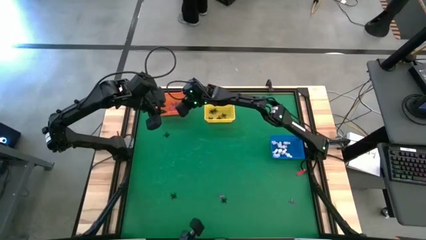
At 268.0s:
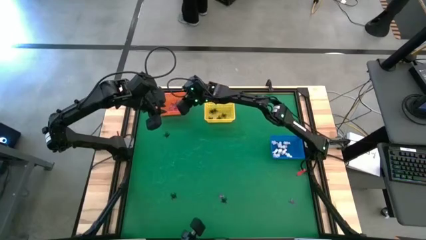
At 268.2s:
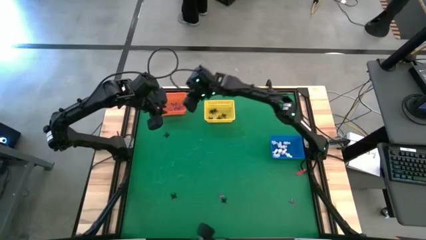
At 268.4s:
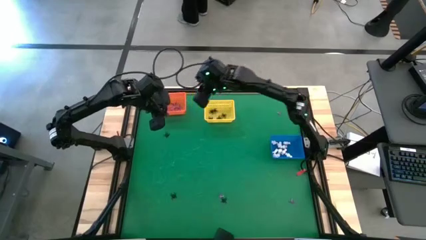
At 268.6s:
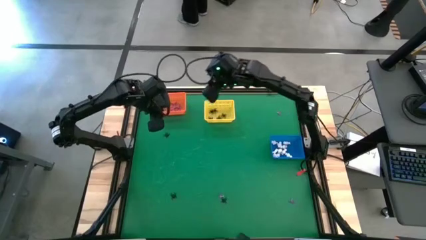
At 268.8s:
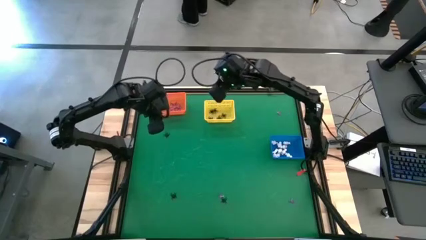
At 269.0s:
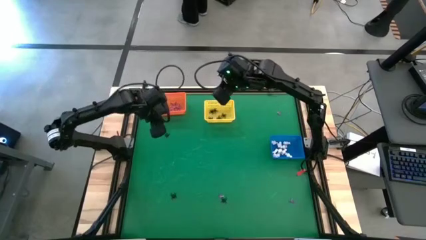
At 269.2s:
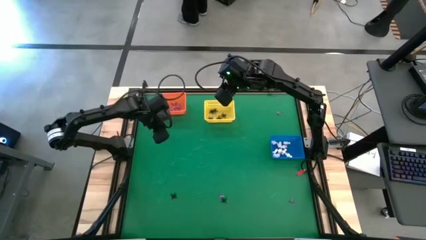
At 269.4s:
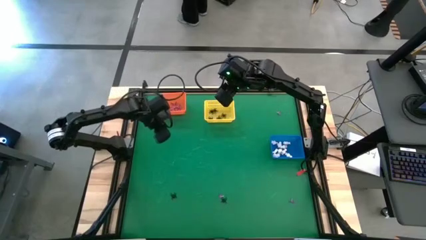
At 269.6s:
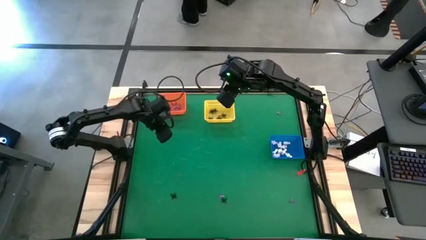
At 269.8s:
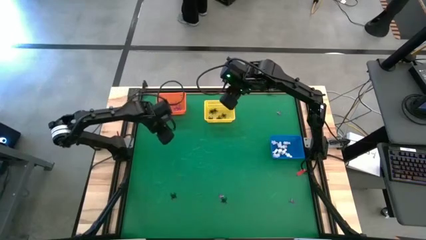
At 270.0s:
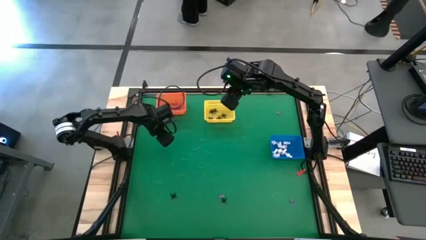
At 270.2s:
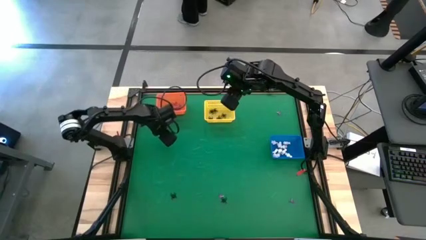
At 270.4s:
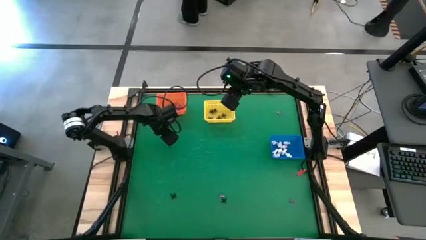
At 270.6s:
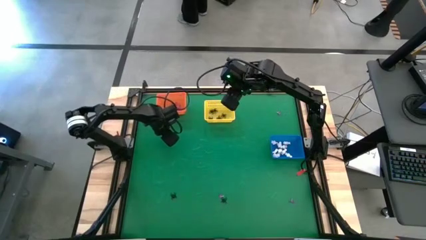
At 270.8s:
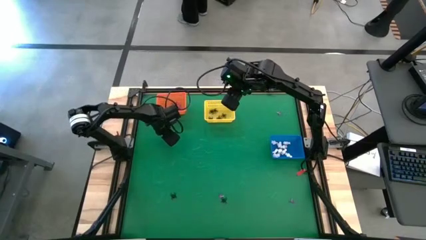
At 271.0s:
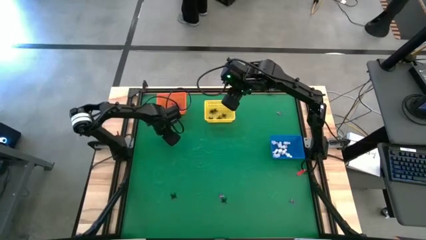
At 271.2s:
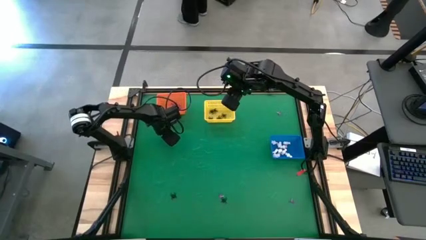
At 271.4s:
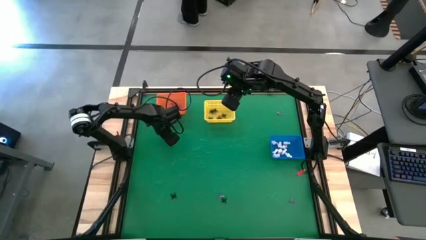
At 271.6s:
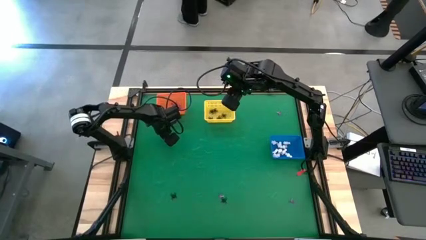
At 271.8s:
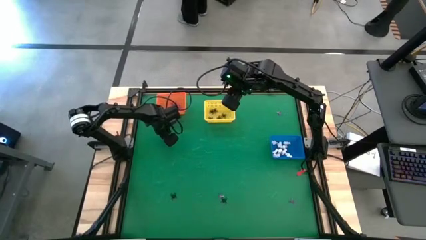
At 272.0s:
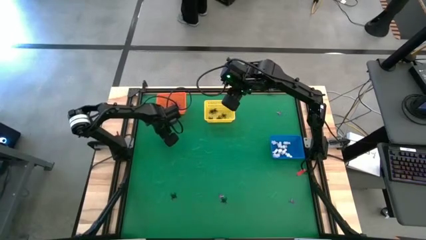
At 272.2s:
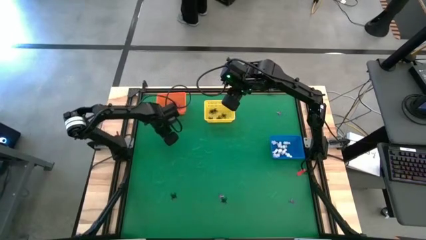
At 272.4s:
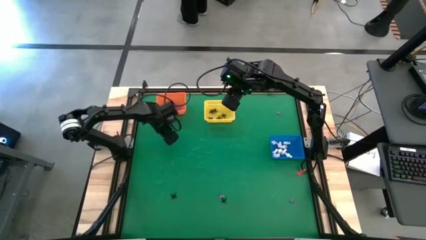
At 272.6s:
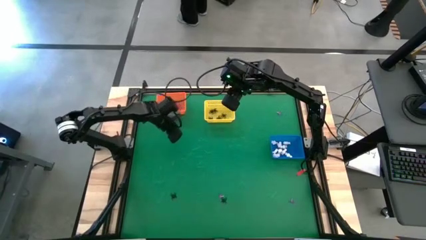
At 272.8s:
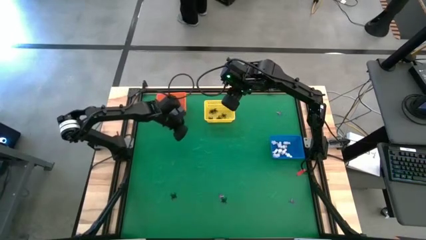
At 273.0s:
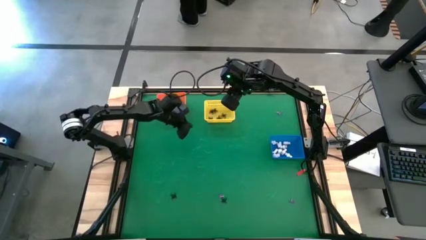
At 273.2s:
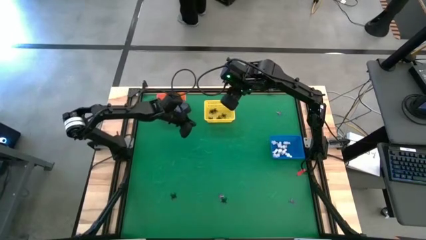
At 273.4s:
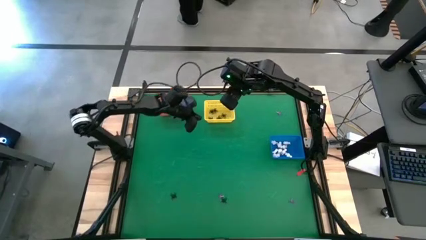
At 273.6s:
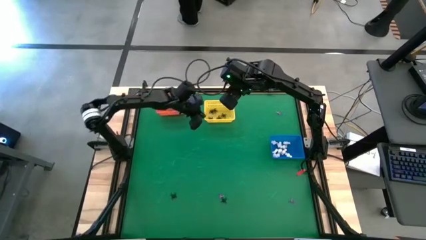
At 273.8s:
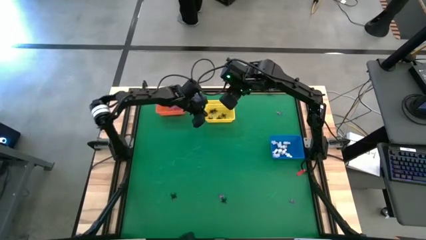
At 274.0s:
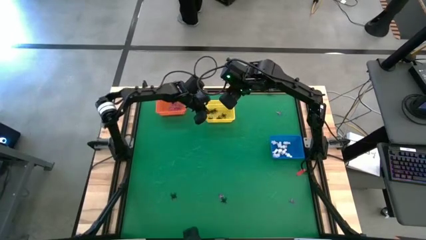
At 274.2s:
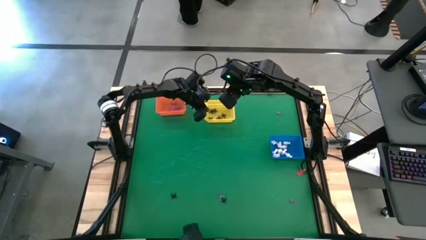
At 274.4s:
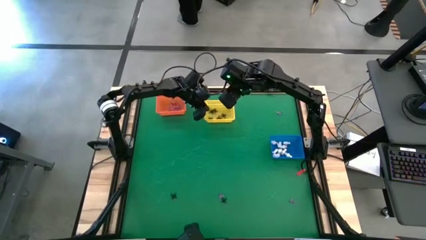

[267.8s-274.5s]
Task: Sort Halloween decoration
Put the black spider toy into the yellow basket

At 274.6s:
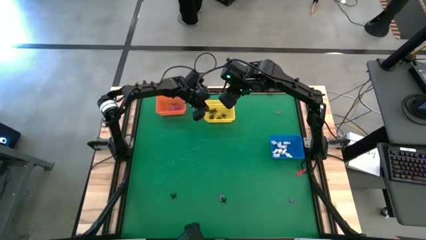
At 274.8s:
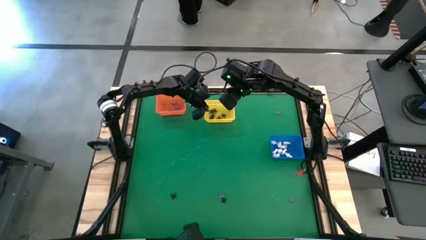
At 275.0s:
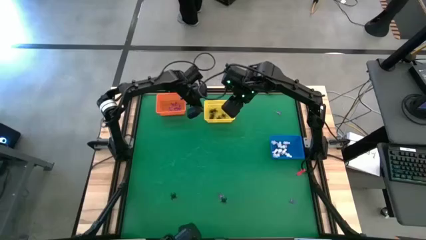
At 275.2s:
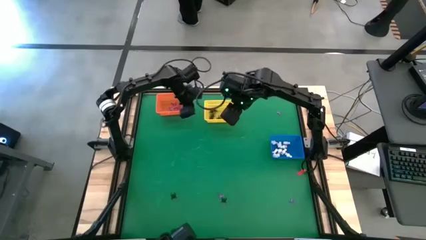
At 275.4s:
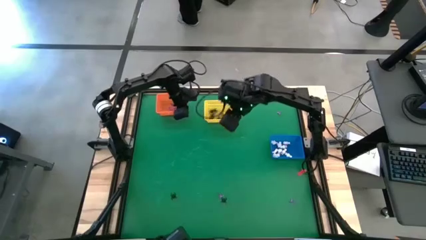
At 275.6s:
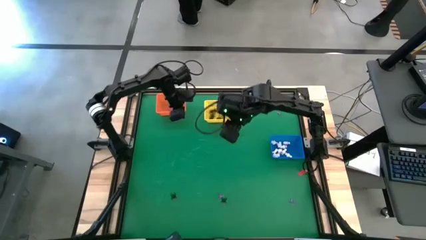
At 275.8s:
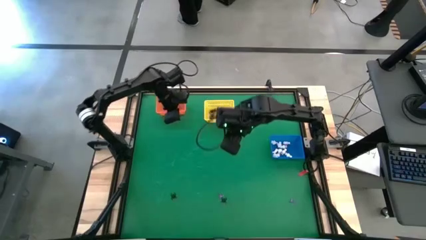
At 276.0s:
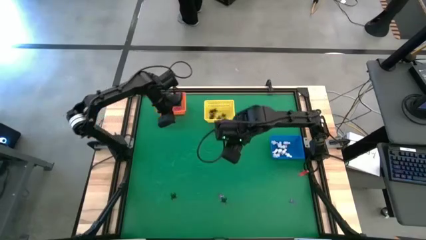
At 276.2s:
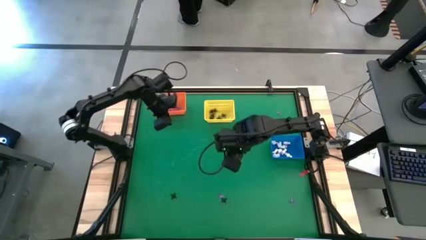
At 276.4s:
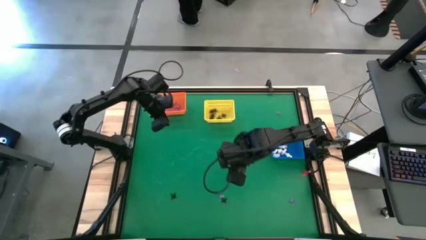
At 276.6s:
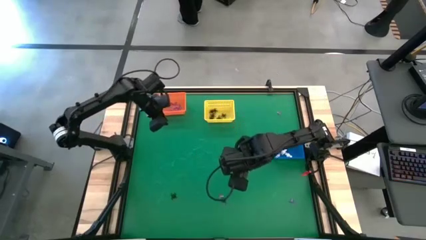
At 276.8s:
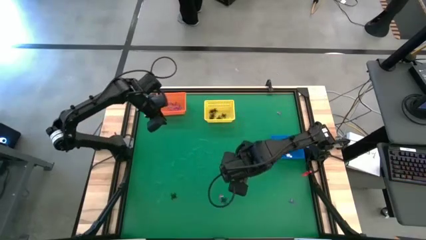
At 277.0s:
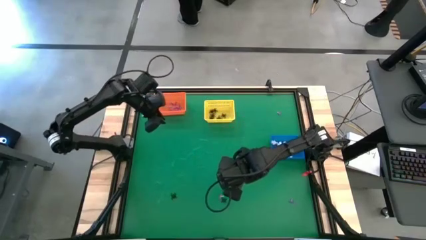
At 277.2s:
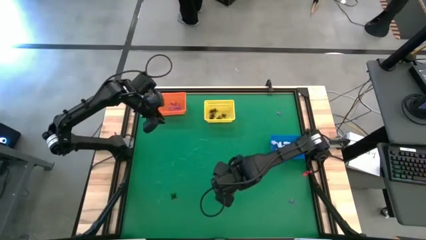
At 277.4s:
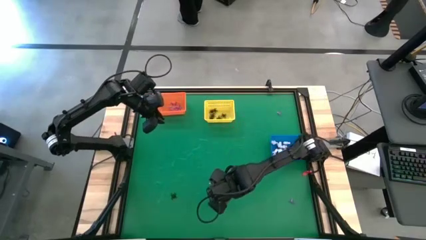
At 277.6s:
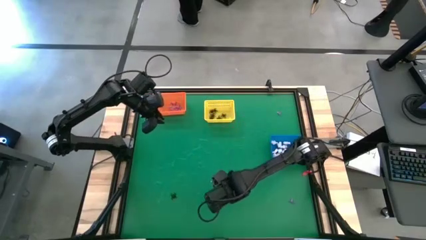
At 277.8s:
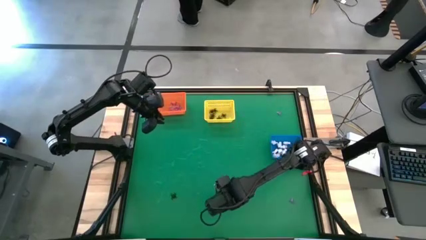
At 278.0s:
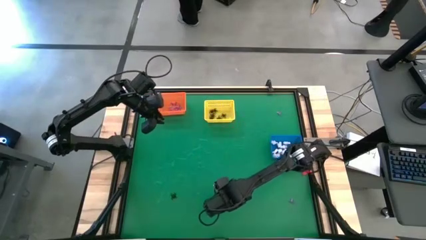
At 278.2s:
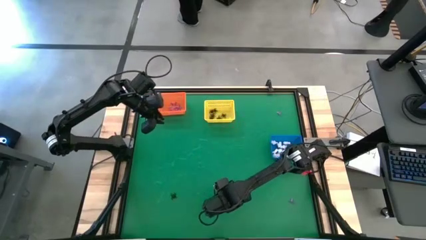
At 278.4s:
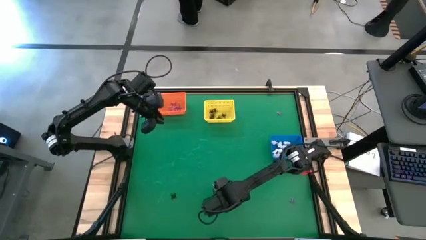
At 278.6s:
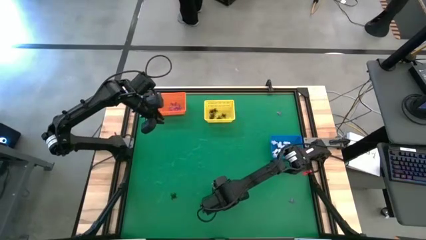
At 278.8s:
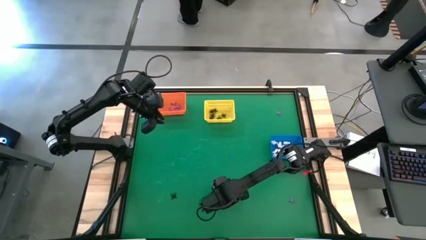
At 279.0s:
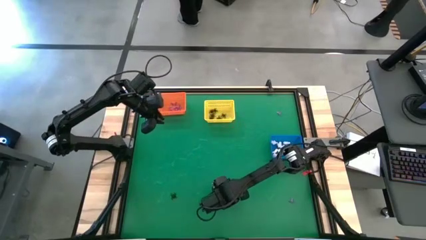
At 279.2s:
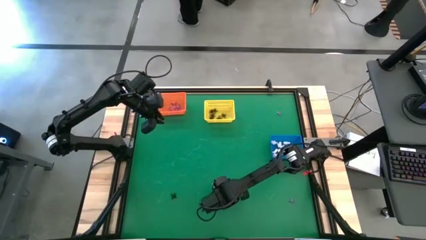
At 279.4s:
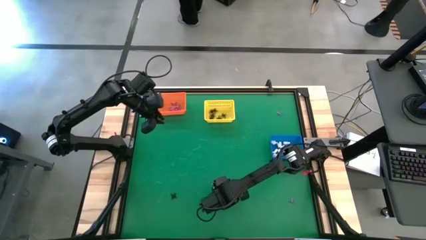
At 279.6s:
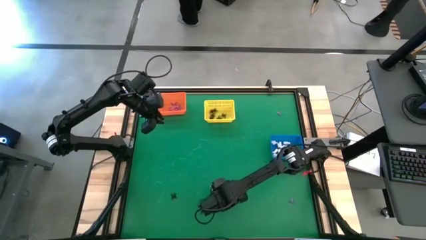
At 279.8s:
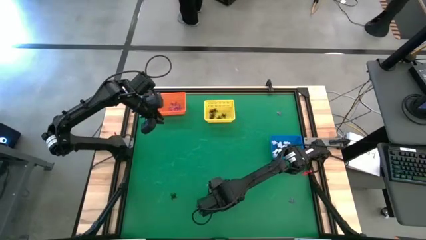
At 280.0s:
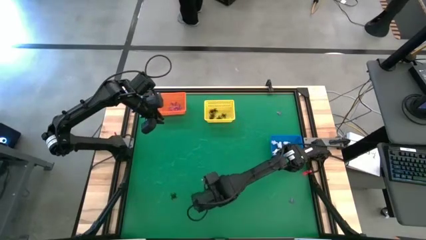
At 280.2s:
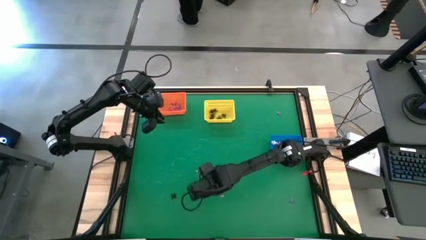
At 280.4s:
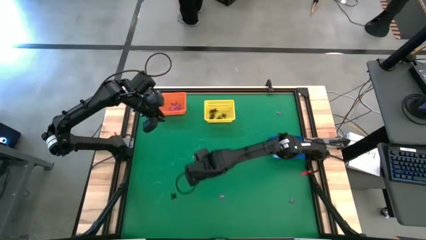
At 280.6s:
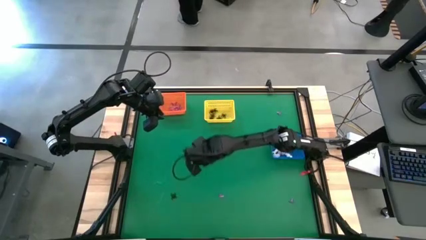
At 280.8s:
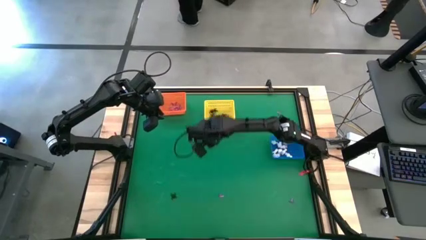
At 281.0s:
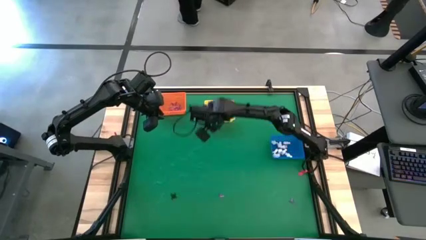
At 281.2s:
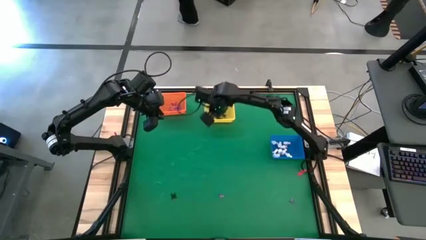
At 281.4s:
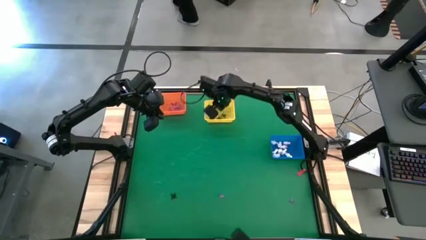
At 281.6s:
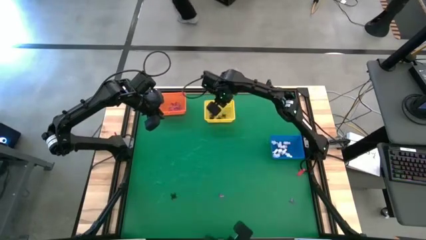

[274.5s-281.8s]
Put the black spider toy into the yellow basket

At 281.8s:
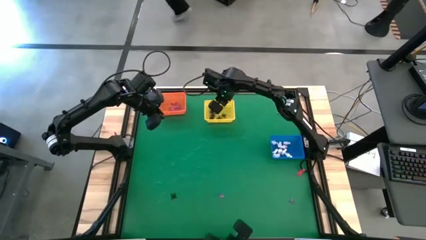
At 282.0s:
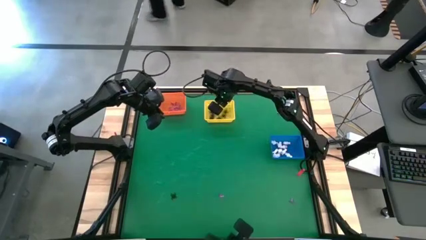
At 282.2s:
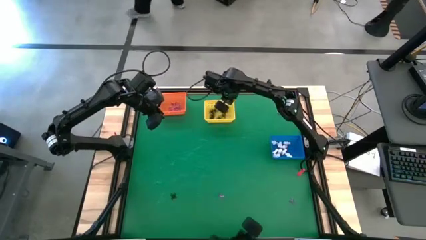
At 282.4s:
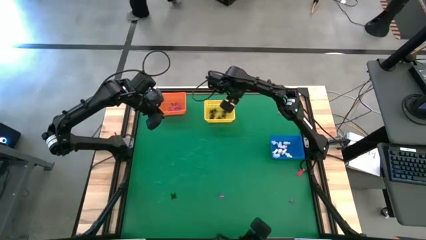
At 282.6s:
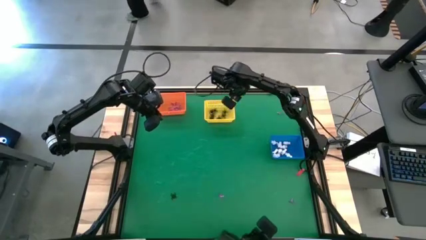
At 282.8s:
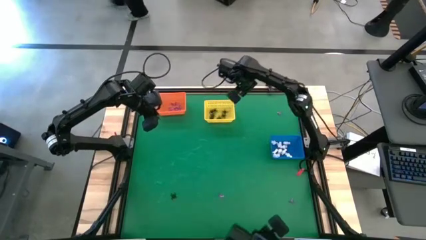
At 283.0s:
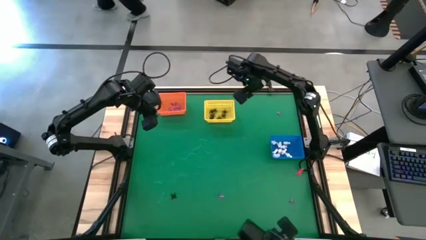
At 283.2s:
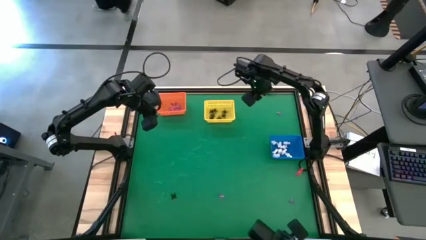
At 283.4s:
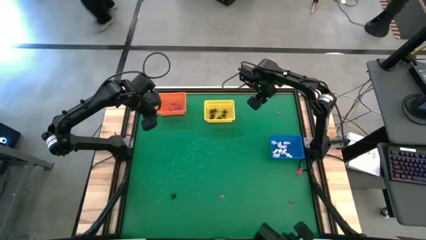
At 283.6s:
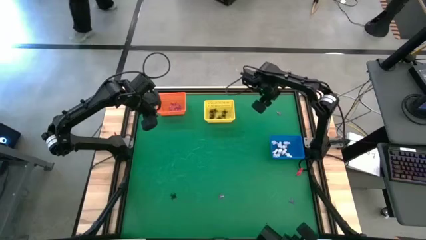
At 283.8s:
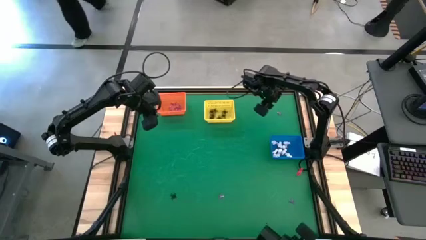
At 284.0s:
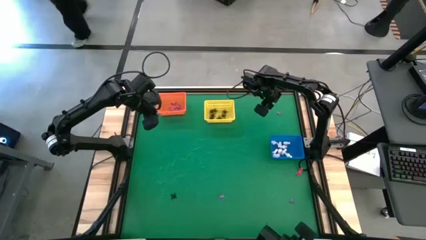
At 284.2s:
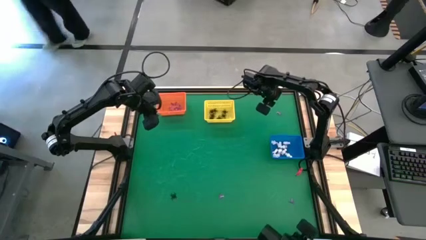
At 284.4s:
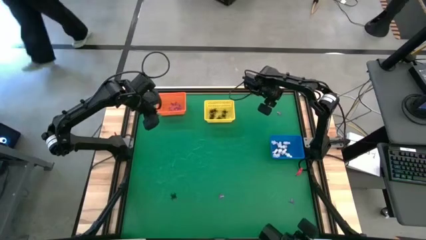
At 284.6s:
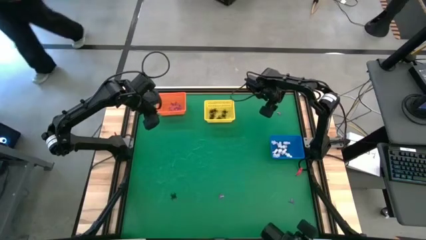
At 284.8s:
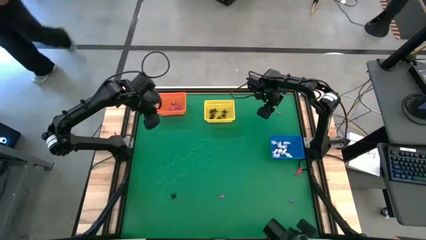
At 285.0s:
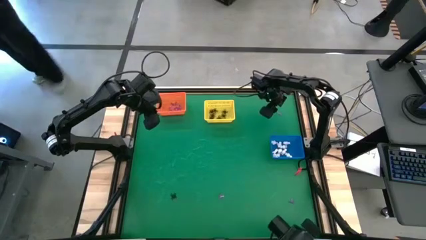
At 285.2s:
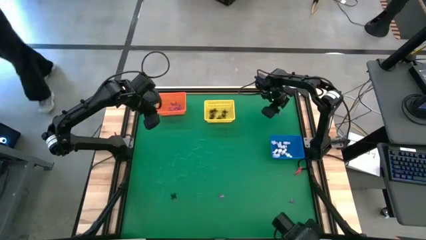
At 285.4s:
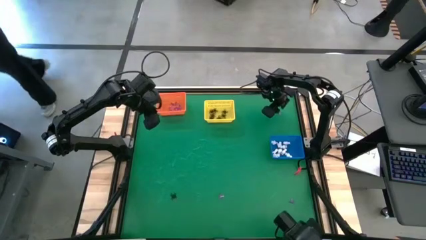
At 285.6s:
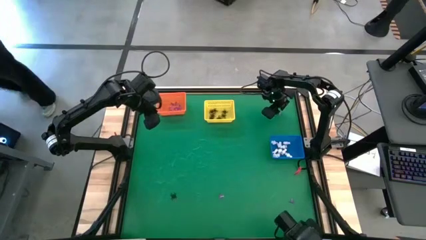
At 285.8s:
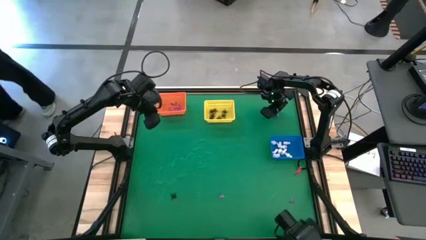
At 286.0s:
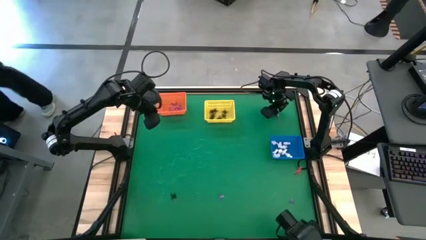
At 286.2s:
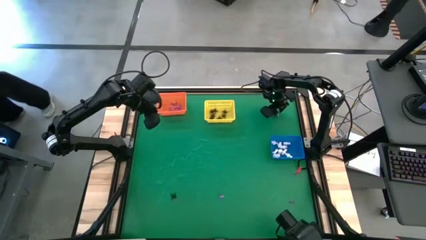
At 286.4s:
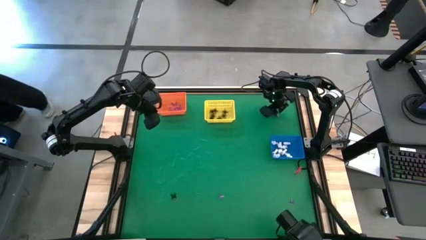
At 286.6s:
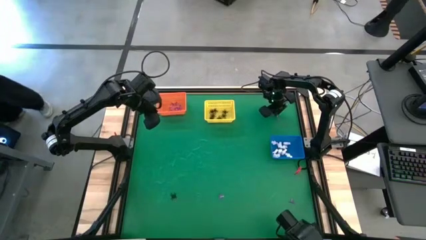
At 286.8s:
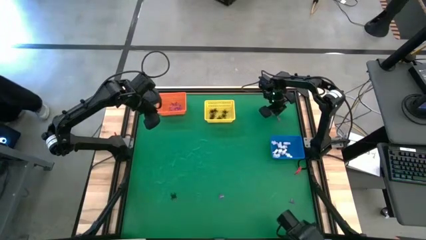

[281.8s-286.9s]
Put the violet hat toy into the orange basket
